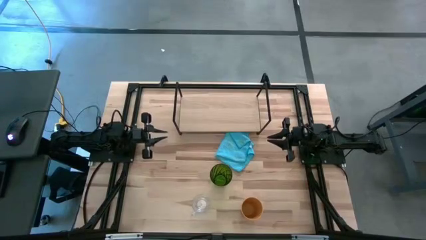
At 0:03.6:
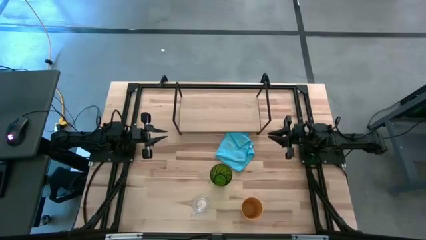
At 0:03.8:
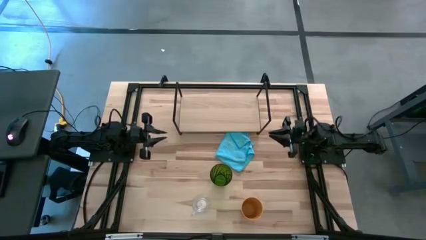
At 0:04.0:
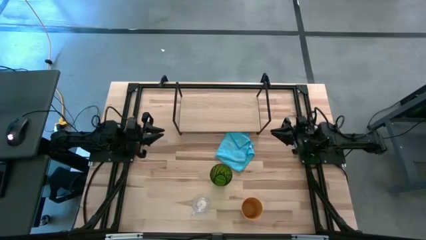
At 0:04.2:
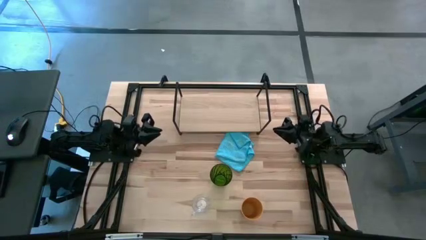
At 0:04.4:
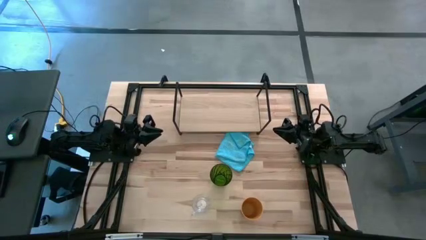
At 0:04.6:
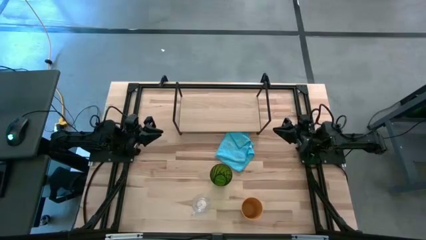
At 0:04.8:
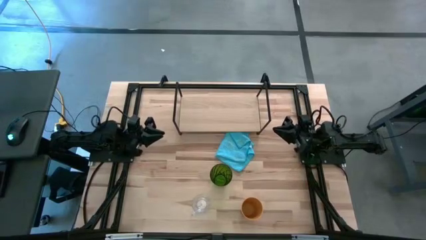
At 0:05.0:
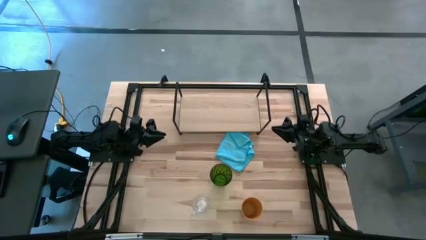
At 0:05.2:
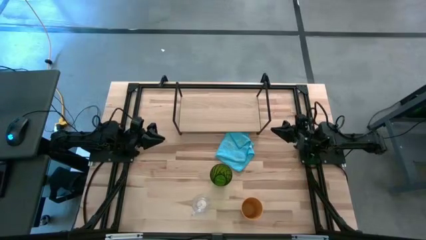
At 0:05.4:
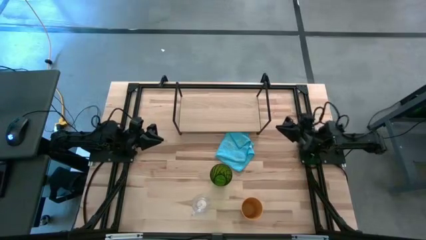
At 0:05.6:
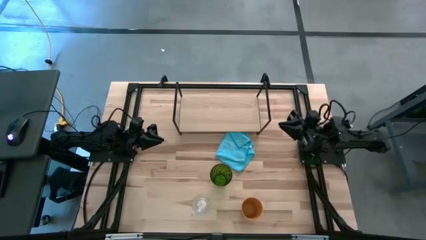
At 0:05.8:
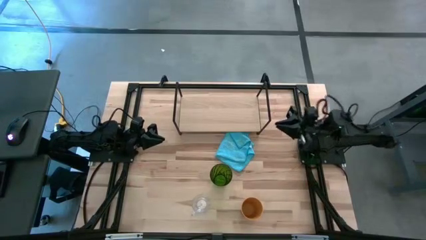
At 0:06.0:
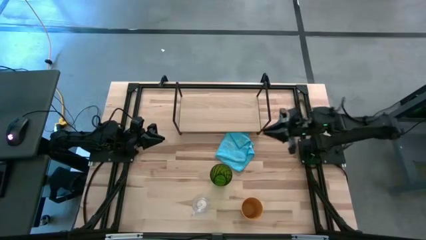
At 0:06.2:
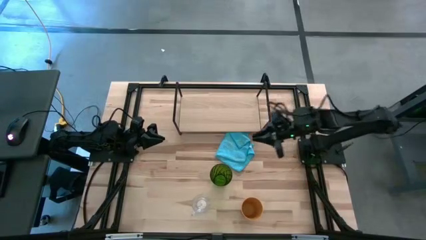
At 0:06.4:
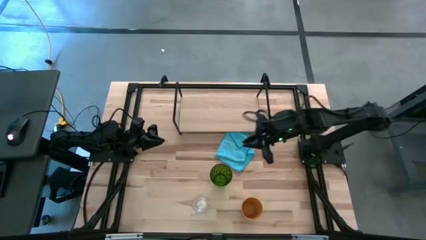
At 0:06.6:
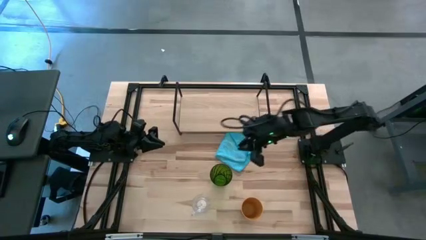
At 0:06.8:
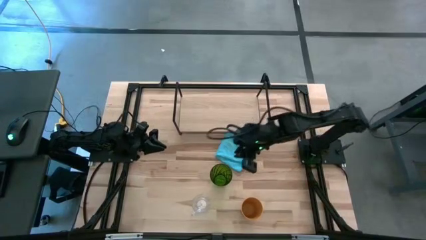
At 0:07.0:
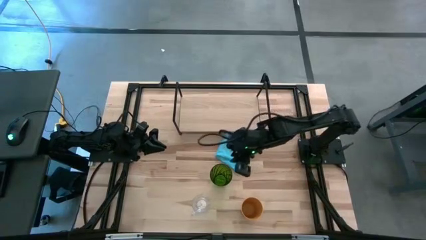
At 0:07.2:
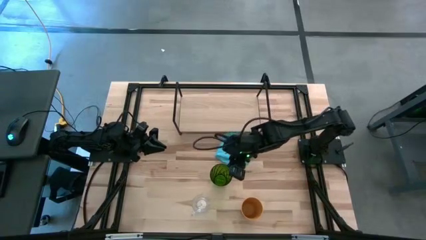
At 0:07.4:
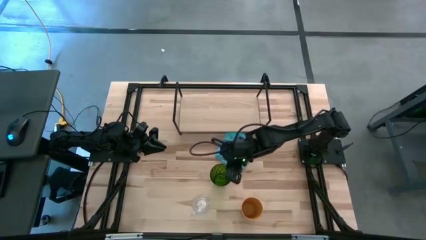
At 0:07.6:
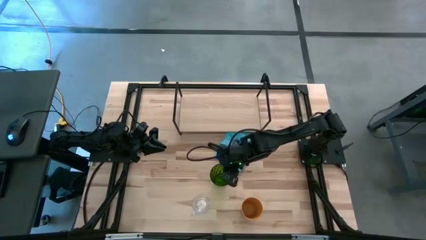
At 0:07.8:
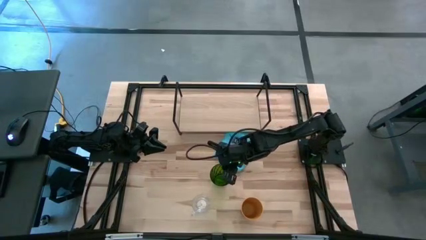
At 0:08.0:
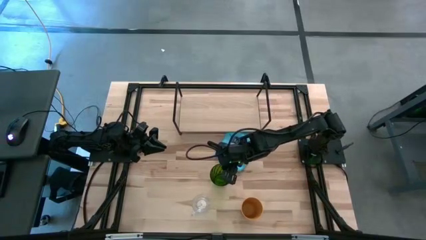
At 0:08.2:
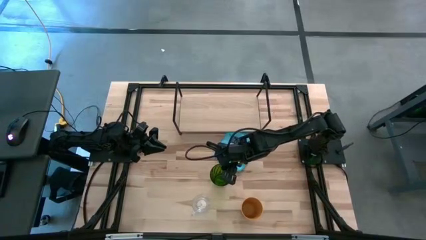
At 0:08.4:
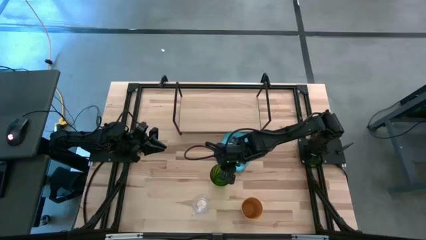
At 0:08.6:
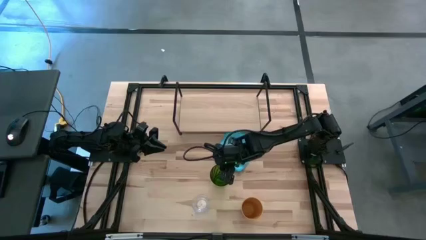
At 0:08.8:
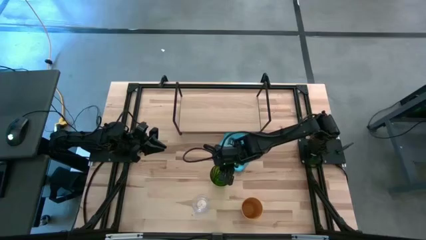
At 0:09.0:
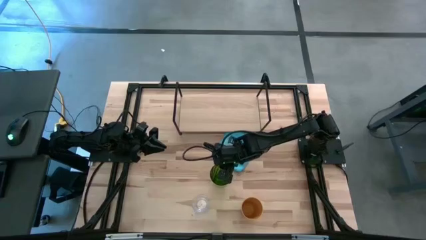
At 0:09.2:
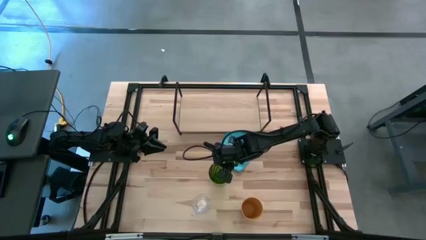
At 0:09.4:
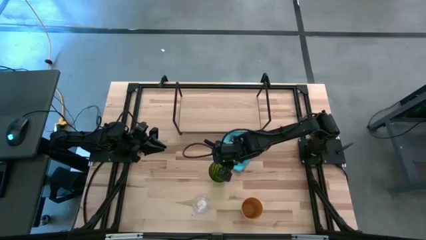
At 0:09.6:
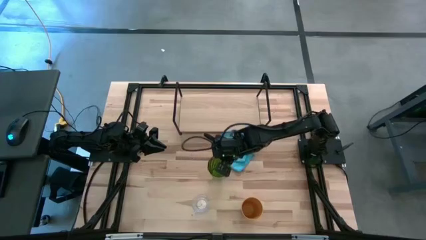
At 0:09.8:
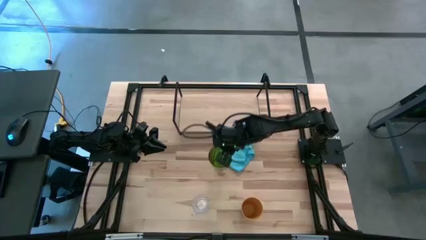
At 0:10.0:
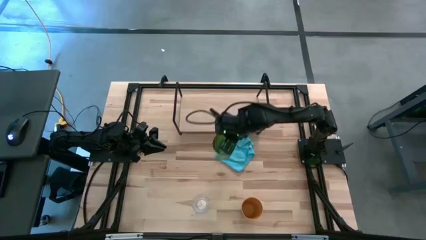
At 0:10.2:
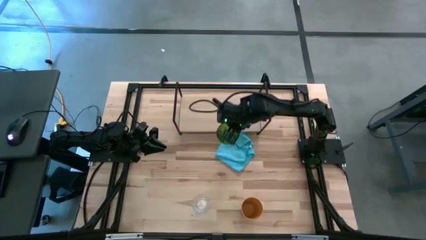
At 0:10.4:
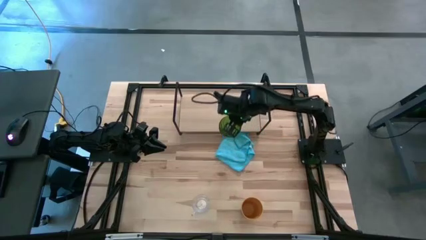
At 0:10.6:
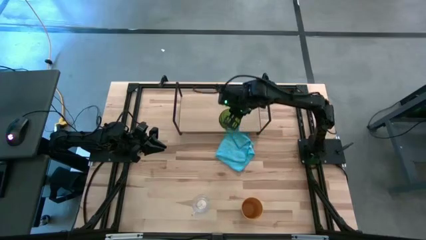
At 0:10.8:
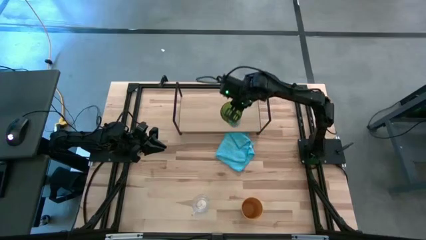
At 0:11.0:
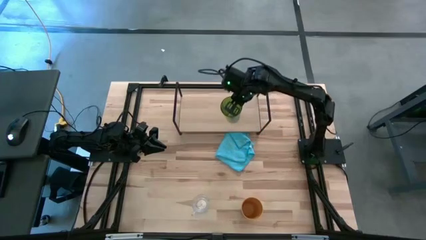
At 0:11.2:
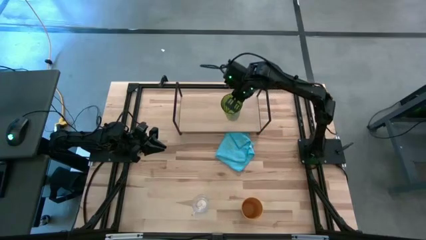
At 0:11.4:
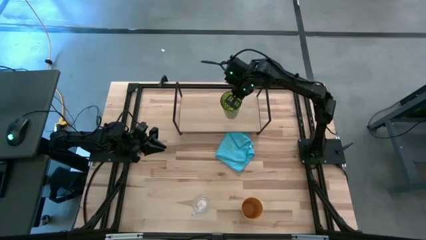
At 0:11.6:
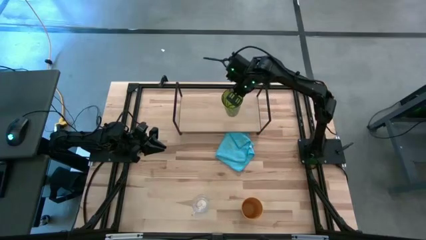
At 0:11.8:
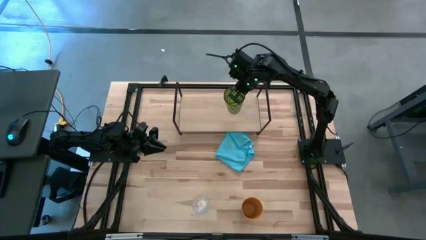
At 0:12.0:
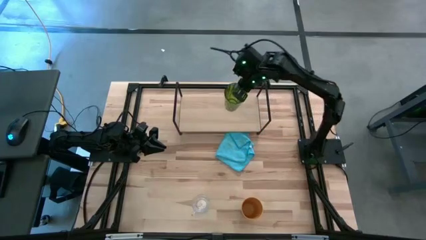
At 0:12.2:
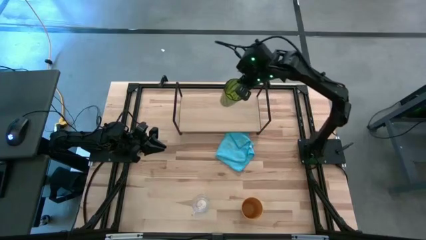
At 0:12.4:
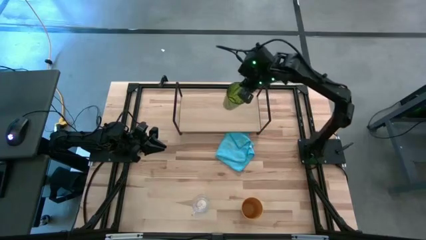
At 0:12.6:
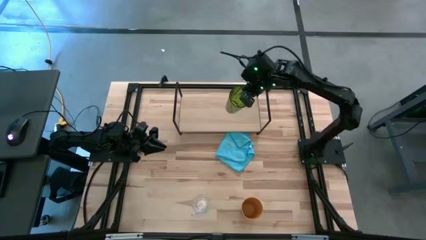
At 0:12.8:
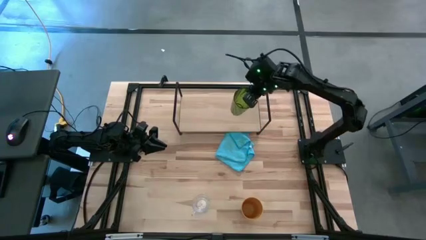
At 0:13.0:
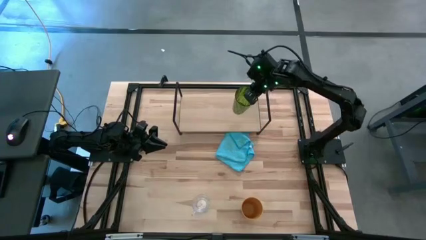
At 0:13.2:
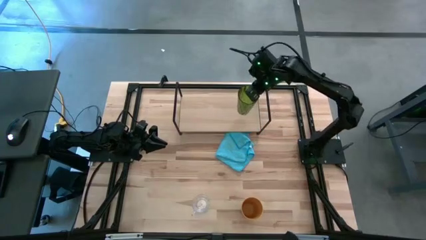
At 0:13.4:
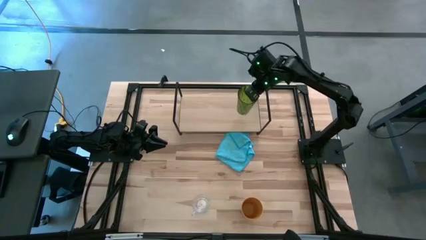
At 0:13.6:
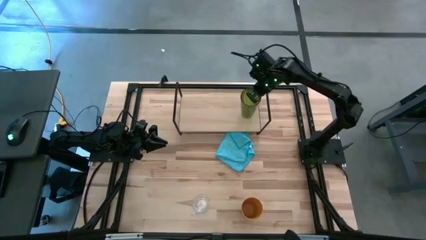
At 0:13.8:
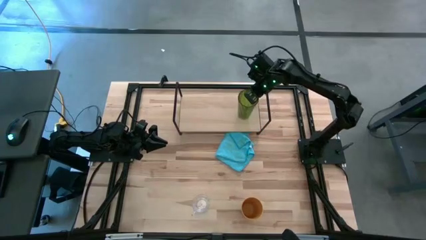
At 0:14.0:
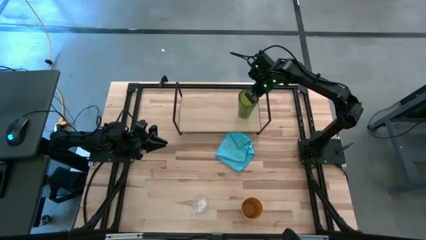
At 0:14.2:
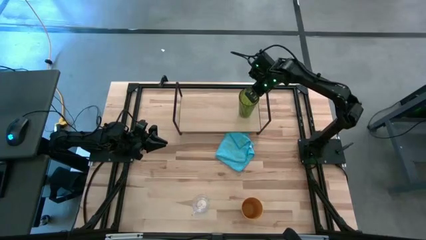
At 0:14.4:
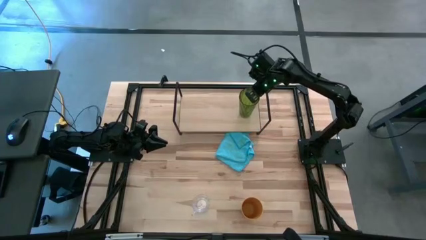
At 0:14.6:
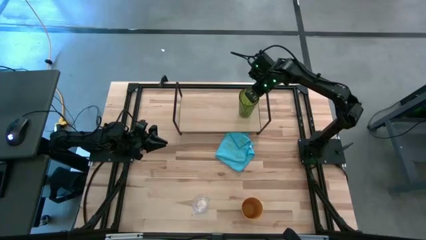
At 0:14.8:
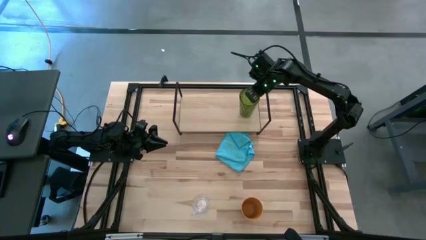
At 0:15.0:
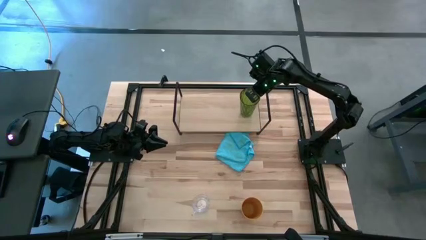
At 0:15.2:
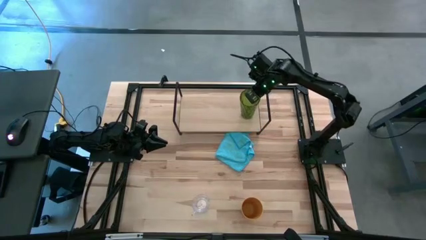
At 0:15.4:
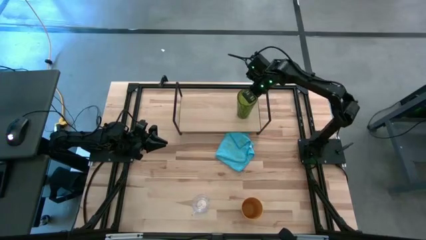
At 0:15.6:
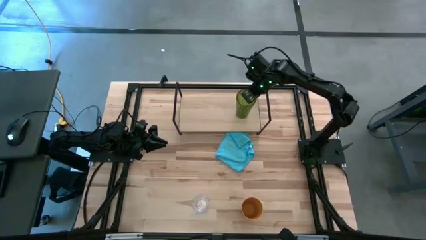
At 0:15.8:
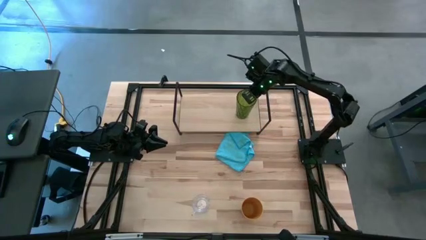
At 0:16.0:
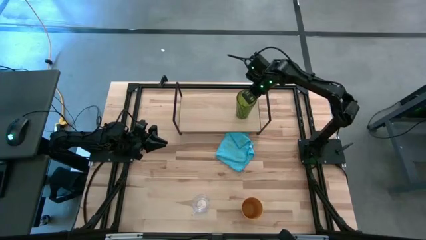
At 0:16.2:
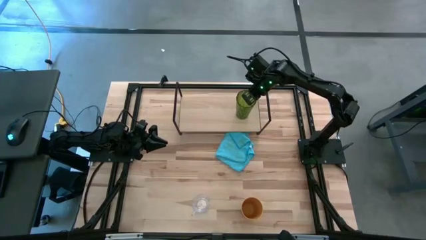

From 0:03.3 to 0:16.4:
Task: Stack small to large cups/mugs on shelf
Put the green glass on the shelf
